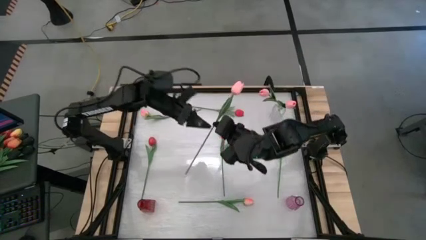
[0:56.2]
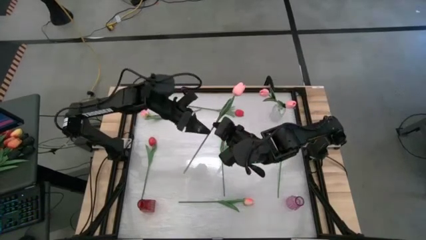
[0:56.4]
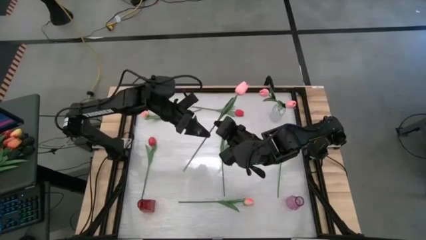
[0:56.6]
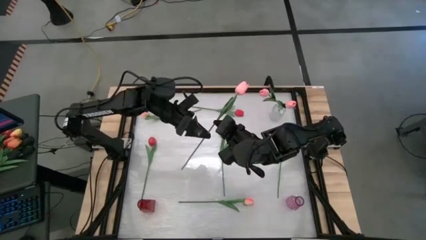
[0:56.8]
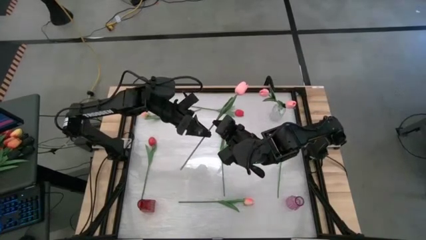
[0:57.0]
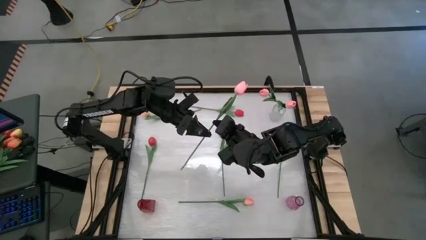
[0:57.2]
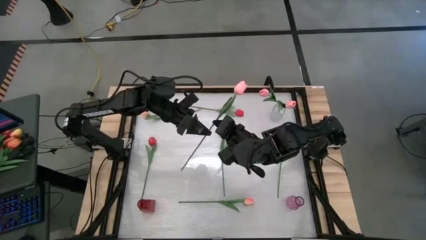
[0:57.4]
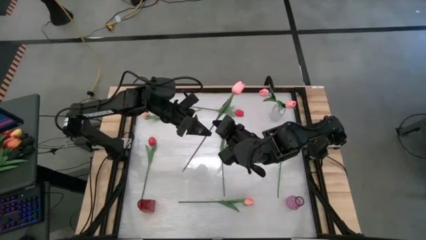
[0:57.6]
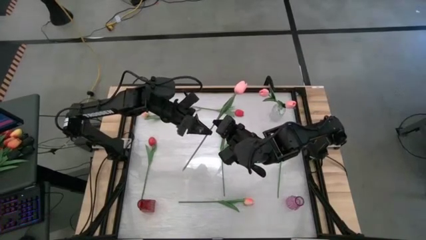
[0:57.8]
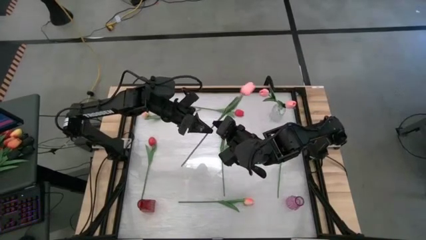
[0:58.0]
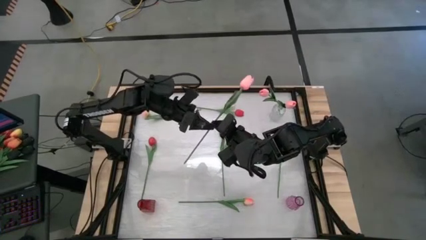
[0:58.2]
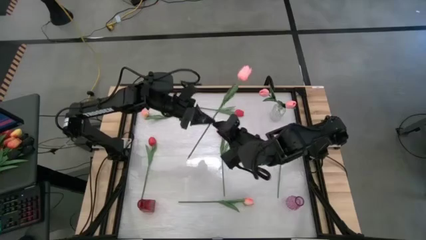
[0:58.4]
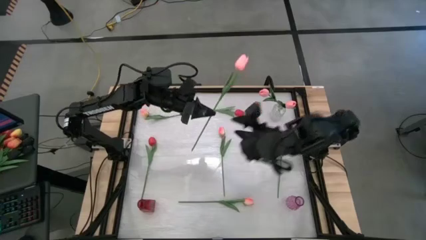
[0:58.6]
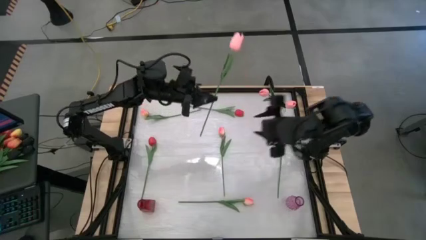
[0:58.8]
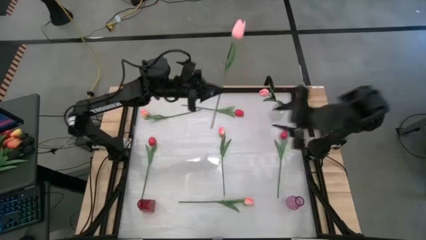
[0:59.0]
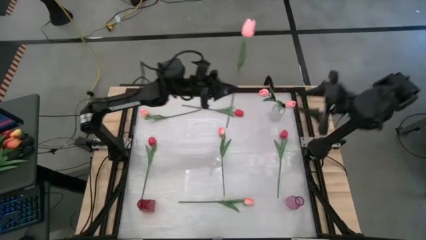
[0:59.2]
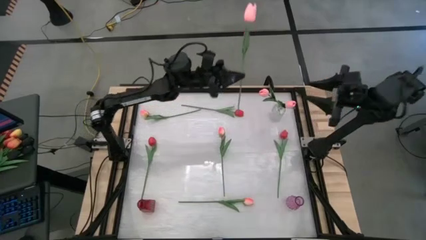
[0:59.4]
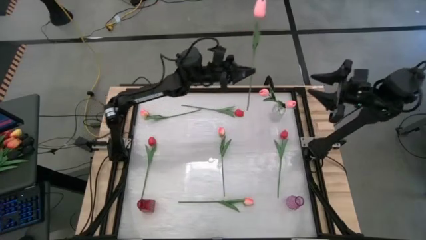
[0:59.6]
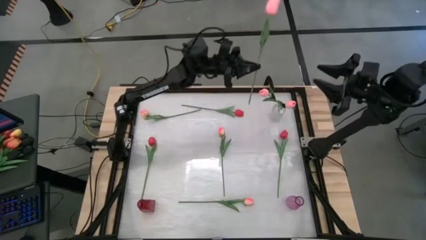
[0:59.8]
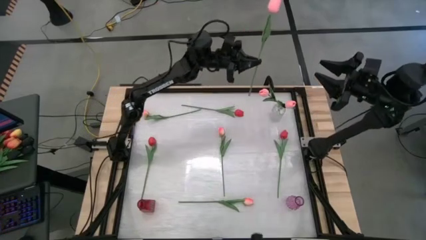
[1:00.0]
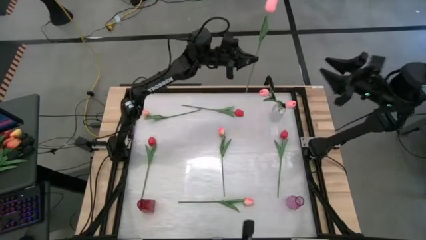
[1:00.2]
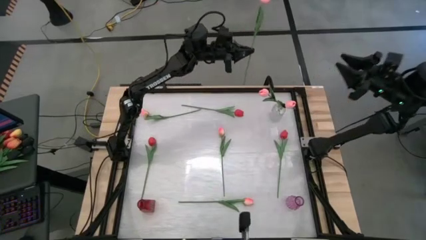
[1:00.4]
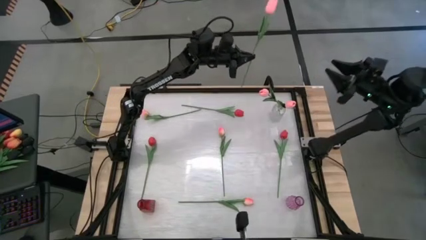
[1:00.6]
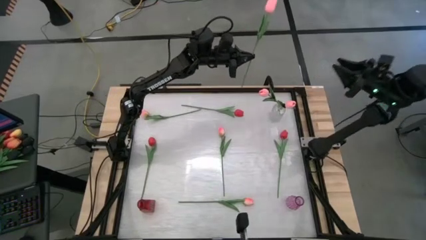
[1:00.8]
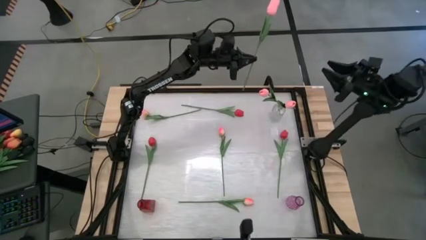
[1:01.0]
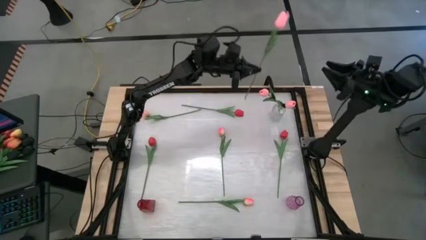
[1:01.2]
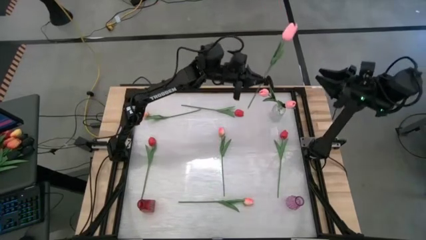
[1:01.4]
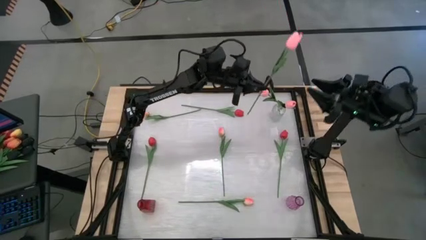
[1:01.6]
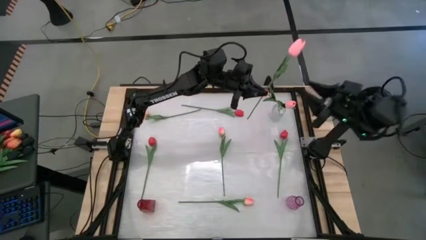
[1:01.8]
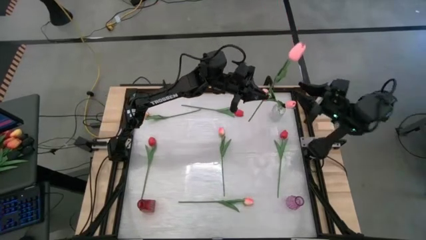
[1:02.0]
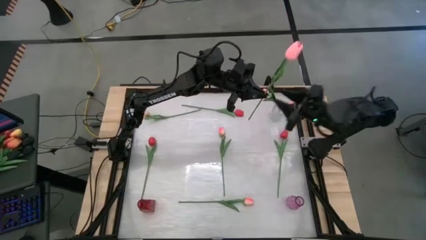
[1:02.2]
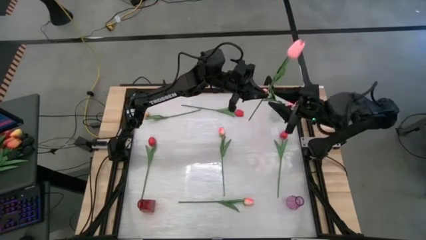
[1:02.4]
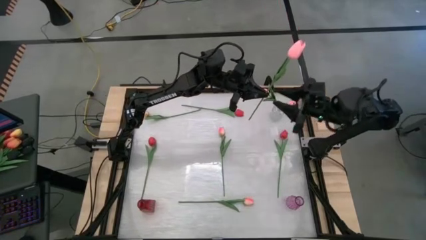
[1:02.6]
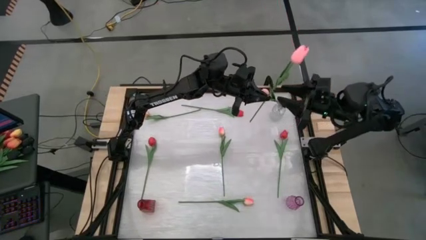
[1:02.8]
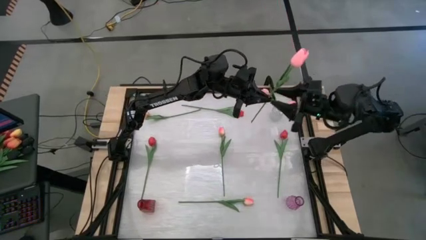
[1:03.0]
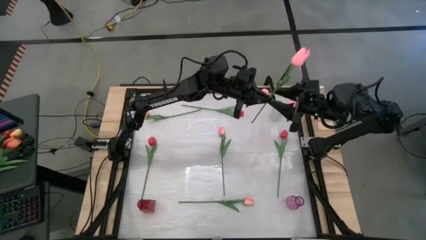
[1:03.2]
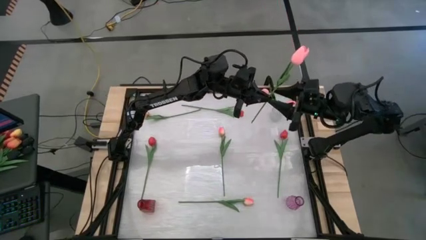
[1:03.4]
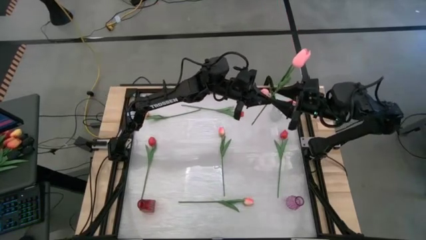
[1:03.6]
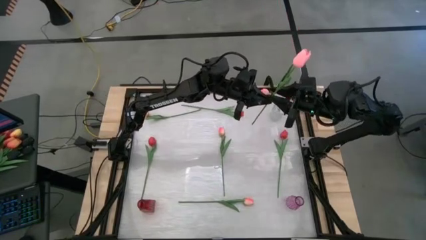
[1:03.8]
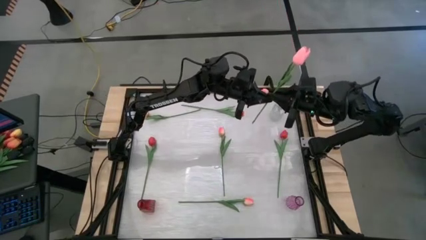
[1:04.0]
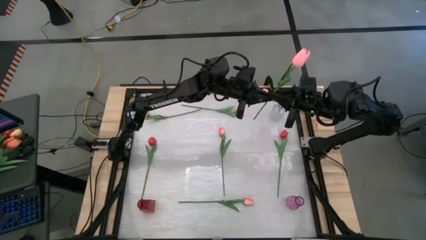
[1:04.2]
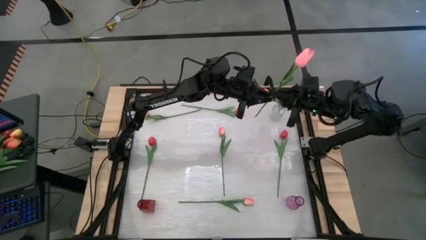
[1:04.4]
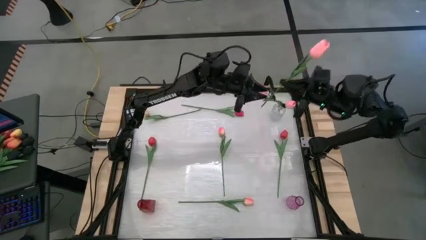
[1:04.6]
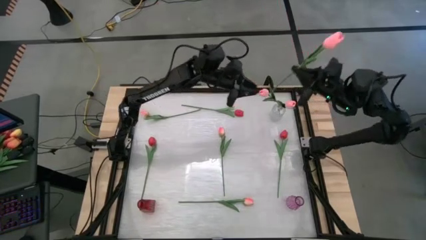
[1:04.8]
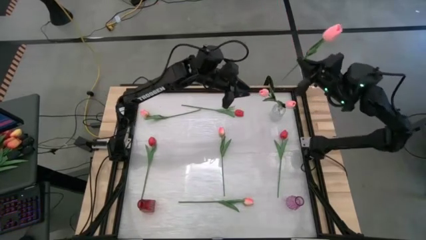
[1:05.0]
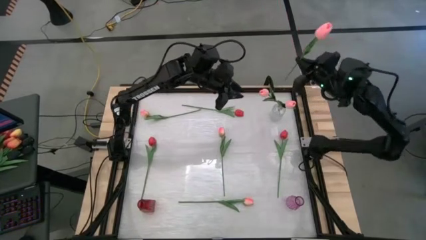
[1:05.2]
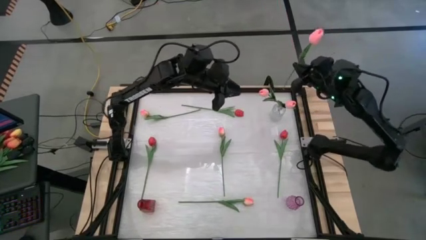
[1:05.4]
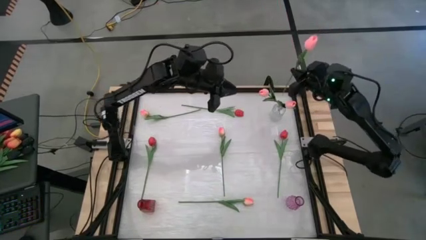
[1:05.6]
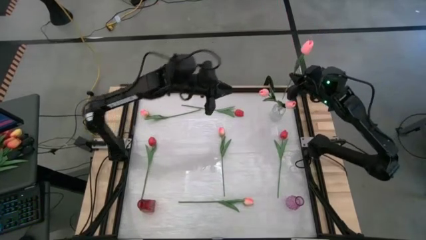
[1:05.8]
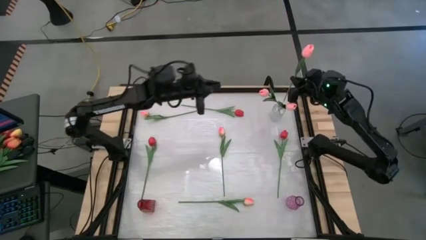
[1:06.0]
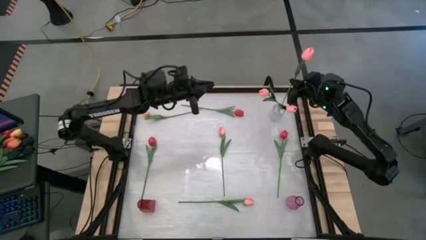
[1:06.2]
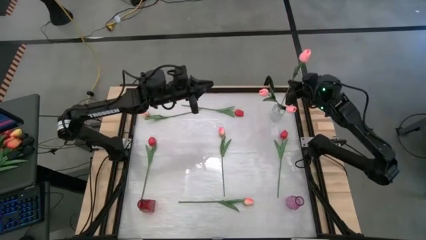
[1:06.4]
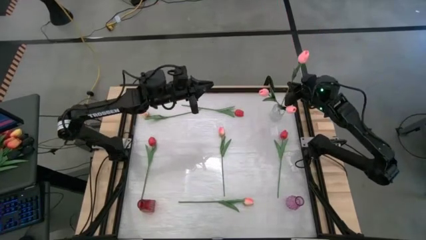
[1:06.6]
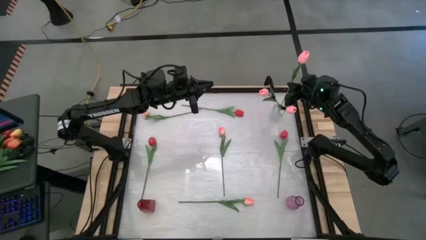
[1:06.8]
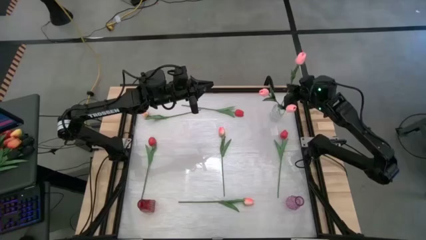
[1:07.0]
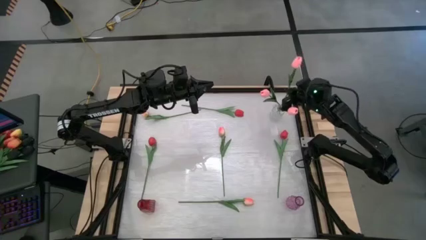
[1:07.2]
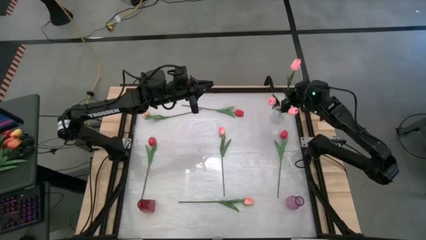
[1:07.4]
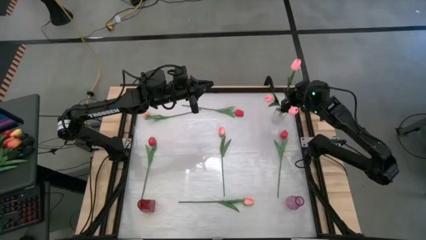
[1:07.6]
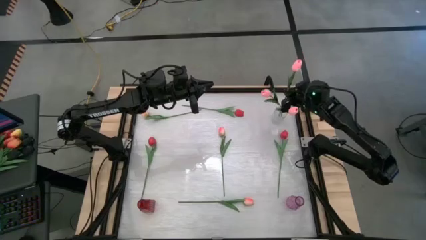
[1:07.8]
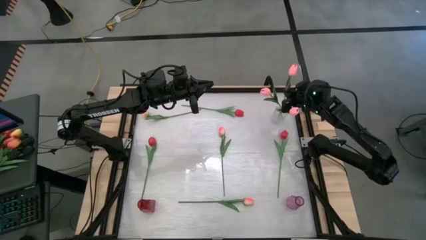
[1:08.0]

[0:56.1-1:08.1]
Task: Sort flowers into vase by color
Put the pink flower in the transparent vase
